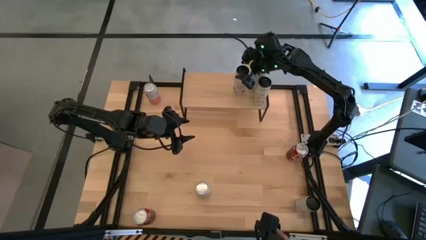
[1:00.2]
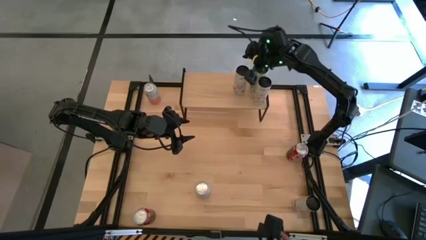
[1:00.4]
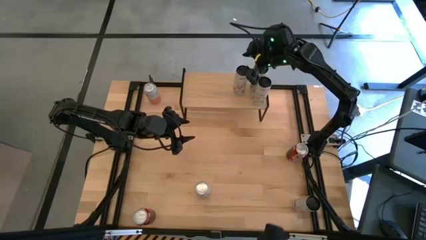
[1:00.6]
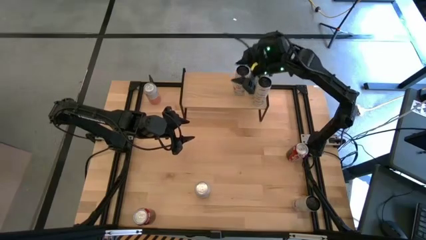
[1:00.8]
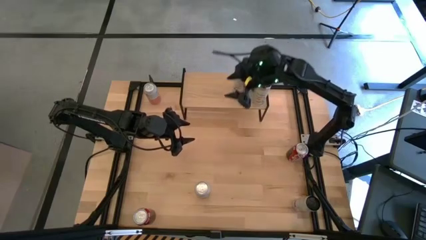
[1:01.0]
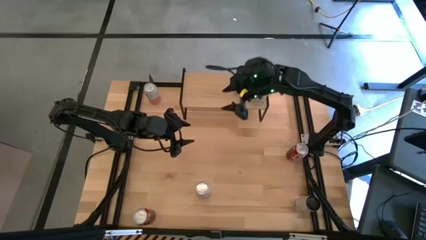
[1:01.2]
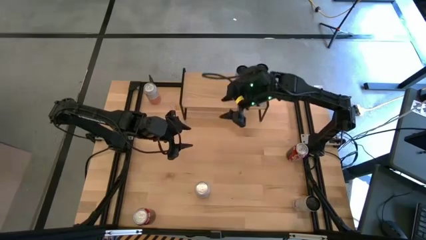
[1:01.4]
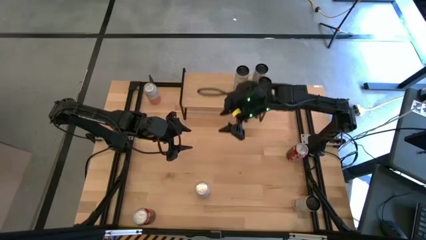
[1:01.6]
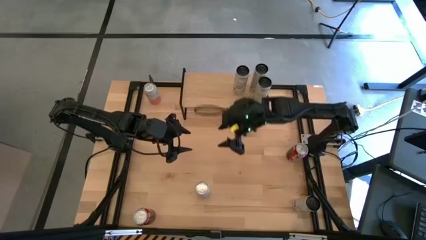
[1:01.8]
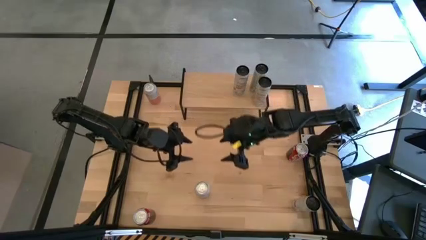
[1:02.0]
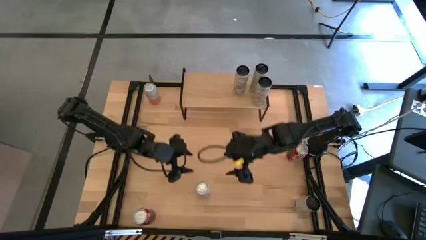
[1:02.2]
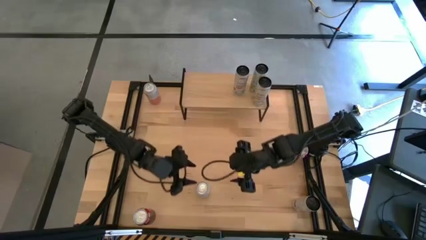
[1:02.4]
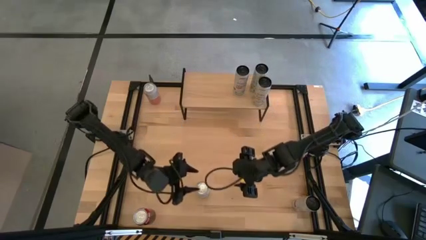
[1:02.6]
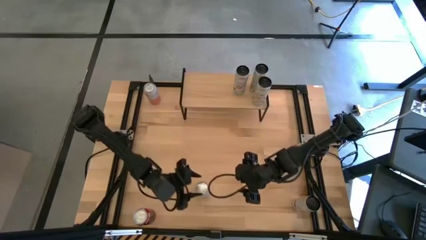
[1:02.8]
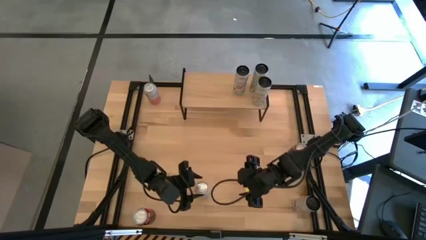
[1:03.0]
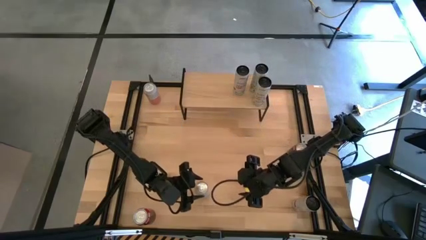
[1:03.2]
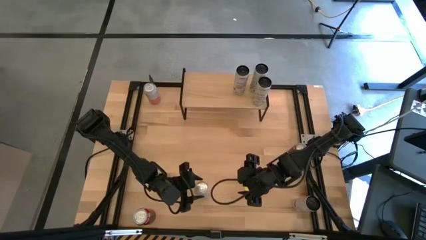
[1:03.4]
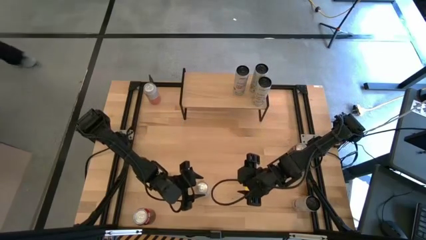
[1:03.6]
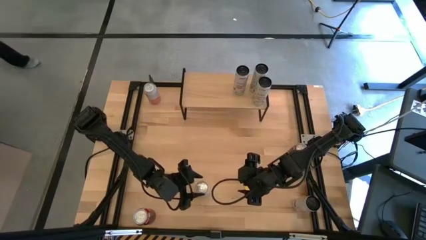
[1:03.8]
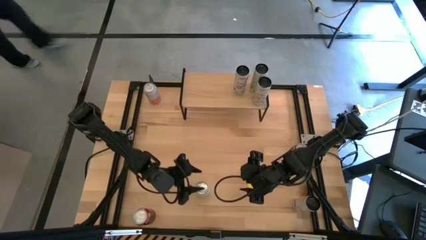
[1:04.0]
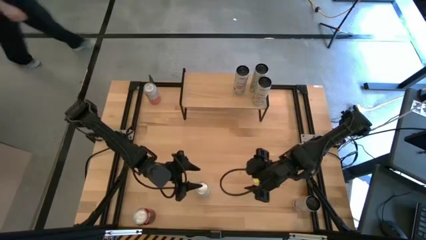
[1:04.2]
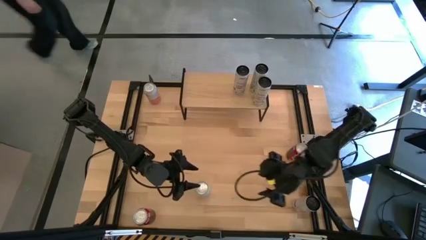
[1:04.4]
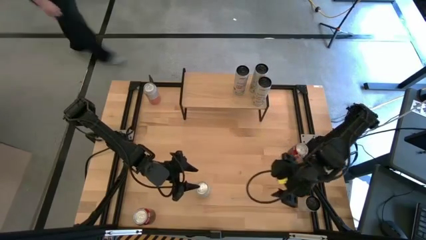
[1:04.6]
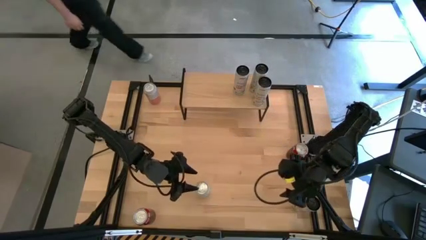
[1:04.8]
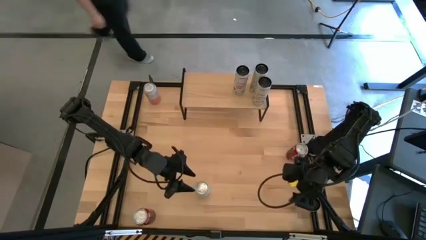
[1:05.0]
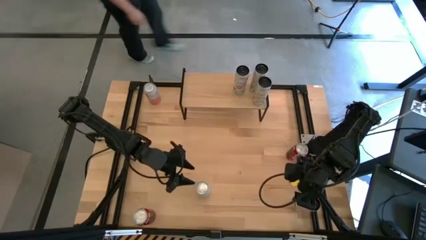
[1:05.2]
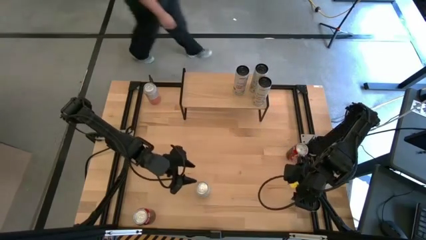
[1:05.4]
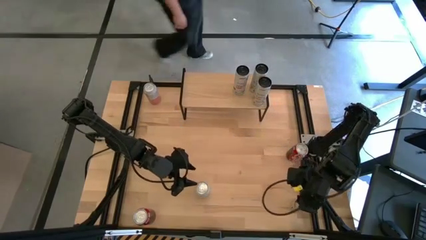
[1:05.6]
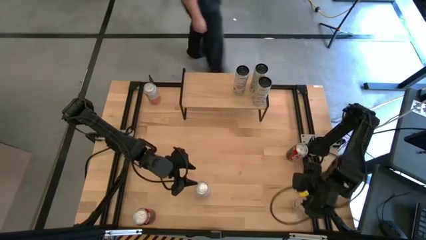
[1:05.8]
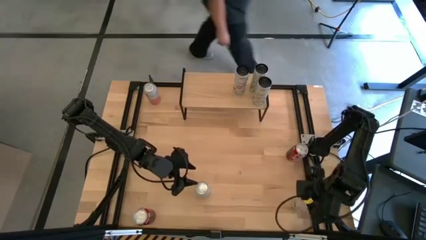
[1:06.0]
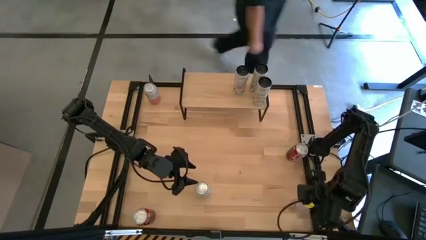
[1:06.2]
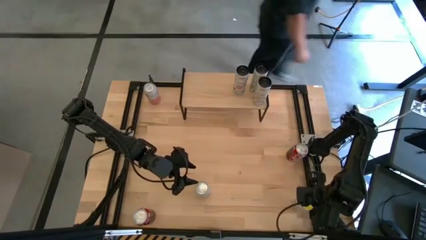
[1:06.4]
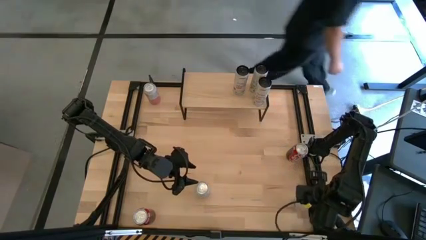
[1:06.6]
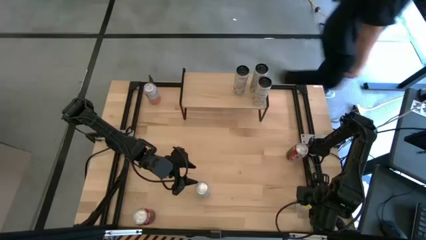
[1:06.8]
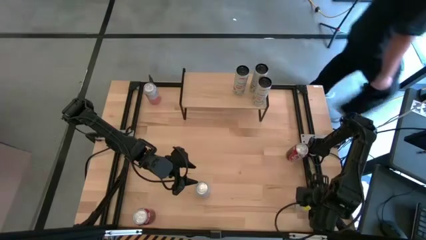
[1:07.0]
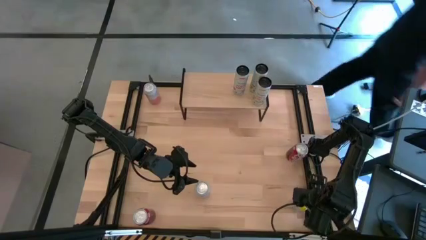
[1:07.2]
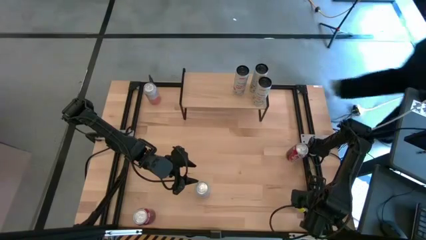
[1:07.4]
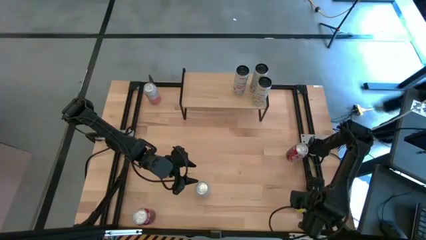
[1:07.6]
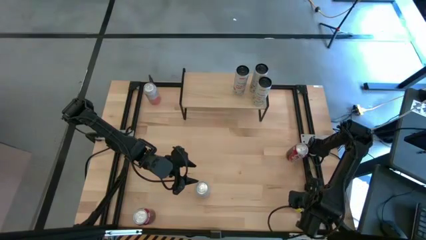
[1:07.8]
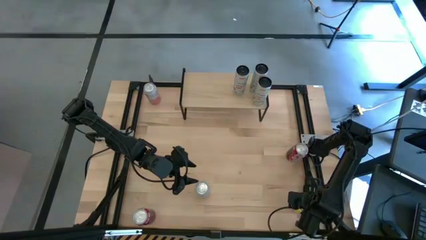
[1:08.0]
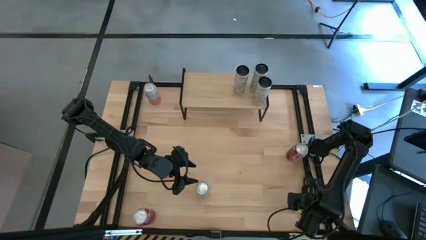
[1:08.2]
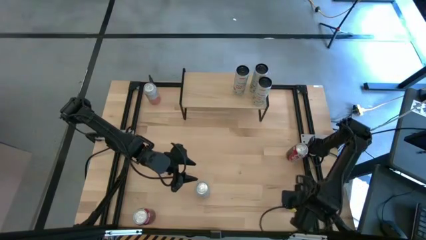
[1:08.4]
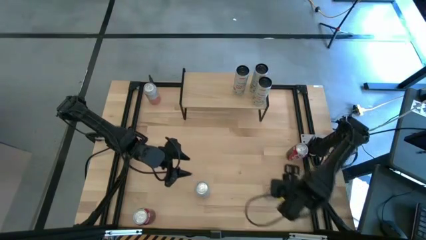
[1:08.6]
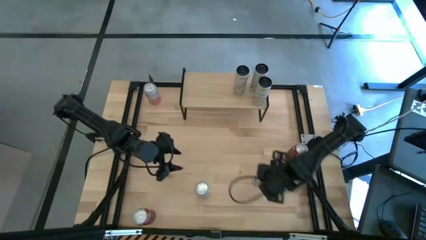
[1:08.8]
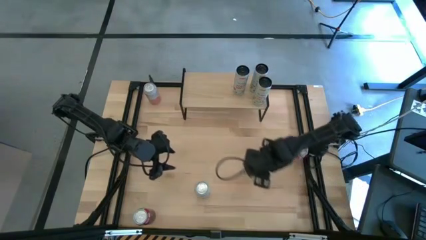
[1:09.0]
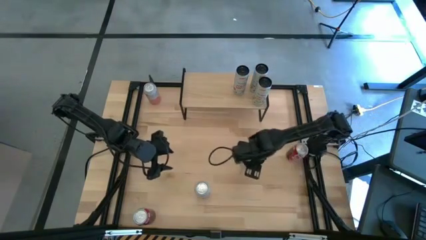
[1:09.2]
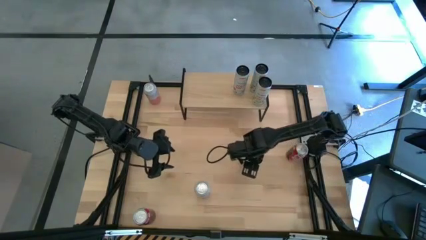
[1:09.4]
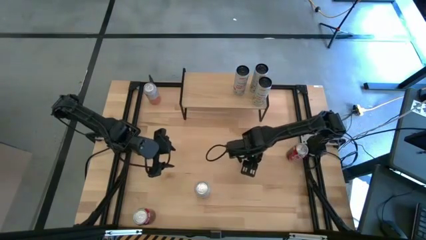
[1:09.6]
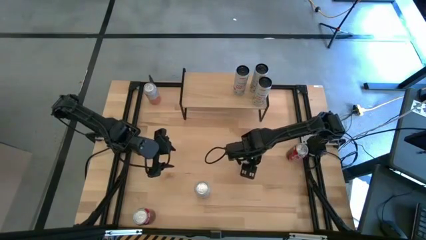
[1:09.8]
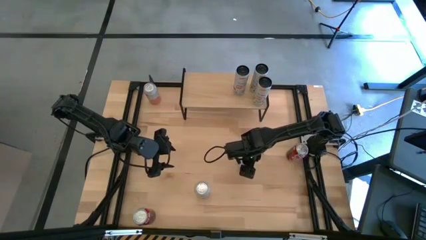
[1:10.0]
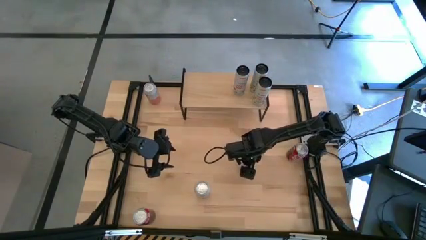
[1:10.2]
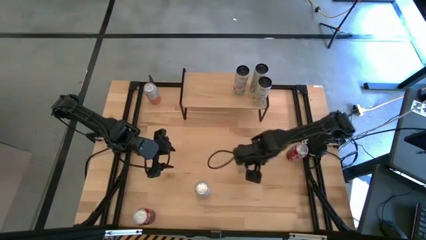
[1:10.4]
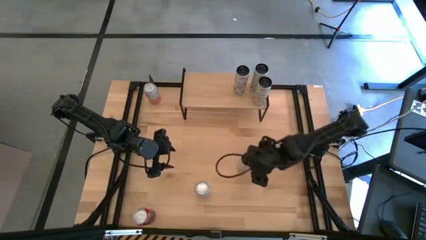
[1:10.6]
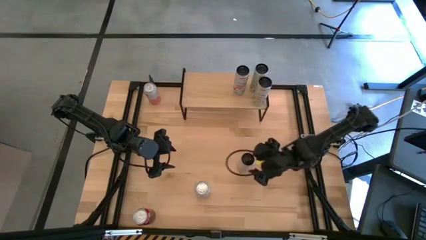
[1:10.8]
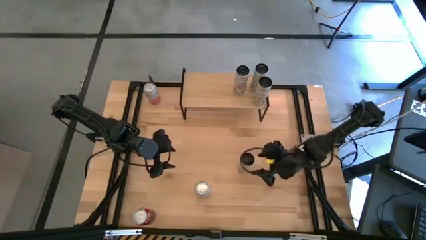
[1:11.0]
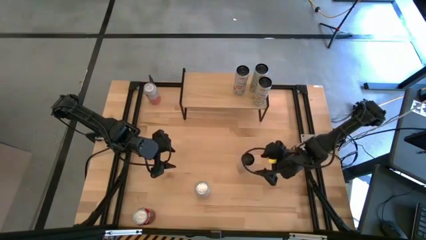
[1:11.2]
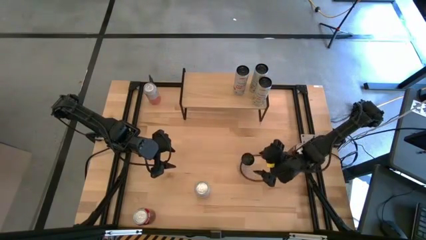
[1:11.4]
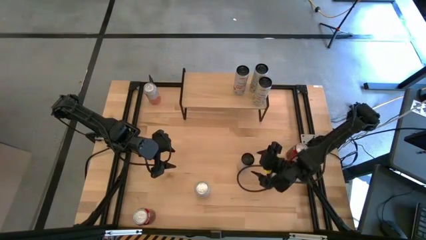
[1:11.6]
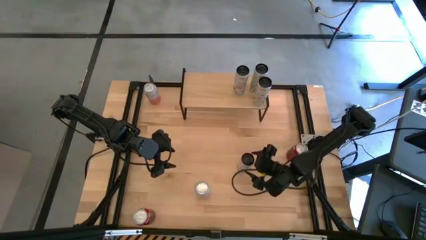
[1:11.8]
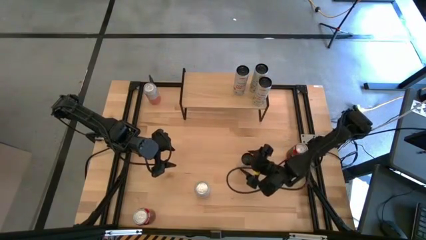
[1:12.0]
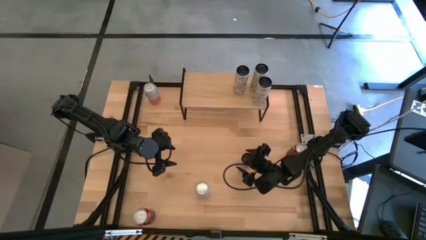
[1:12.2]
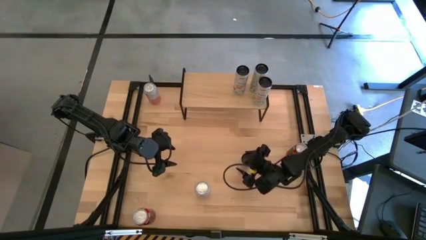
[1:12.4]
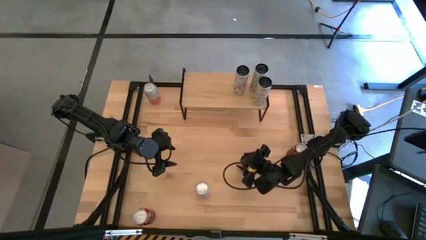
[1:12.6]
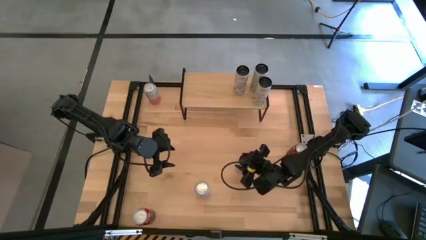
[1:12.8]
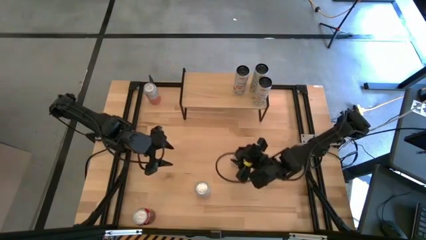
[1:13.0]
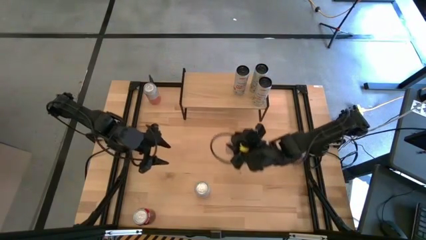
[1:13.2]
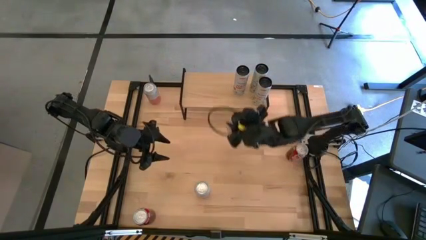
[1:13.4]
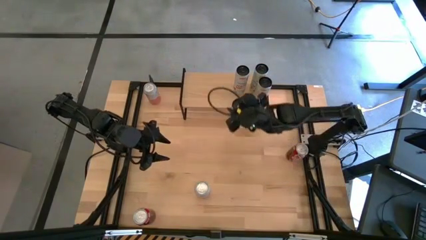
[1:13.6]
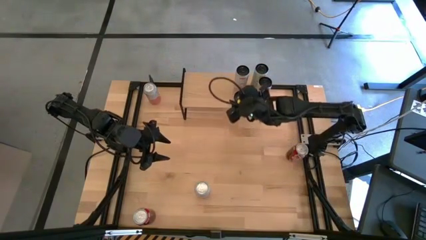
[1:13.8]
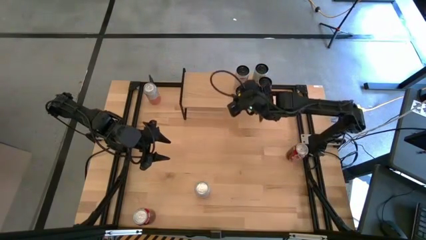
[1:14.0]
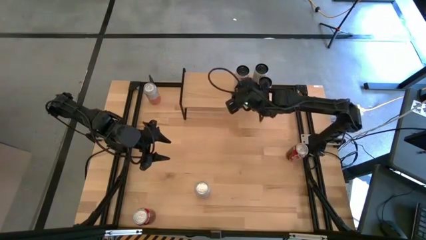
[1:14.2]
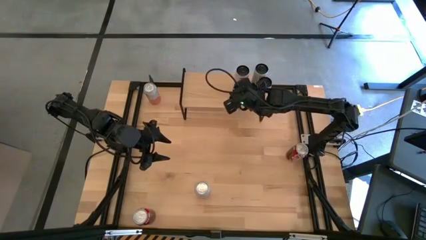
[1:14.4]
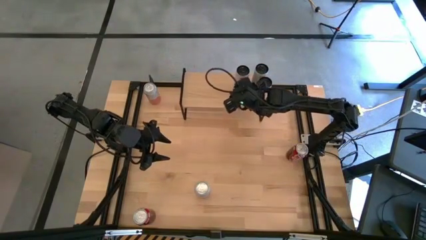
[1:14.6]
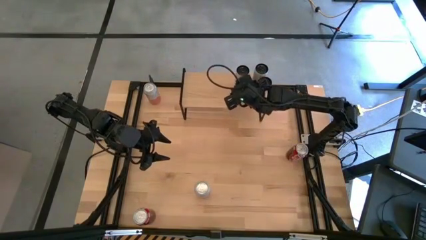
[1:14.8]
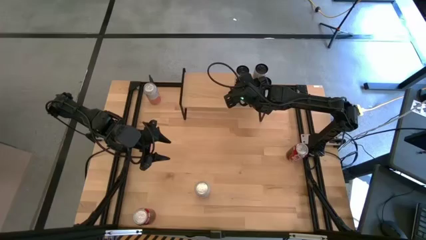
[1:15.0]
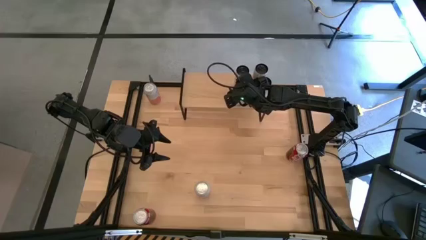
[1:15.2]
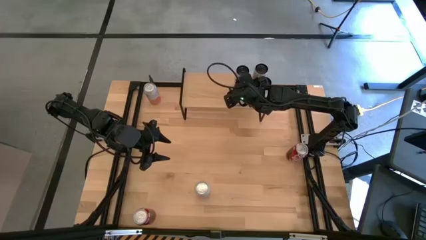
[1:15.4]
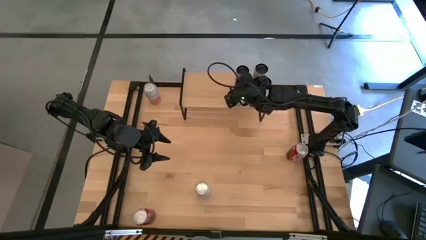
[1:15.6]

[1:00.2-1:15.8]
Task: Place canned beverage on shelf
Put the white and pink soda can aligned with other white and pink soda can on the shelf
